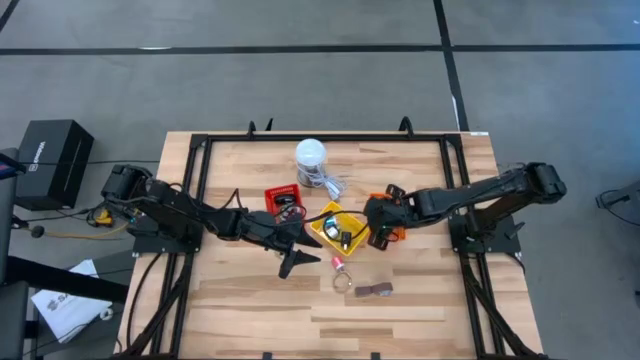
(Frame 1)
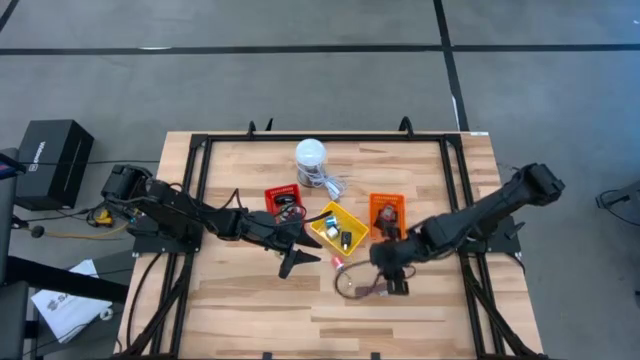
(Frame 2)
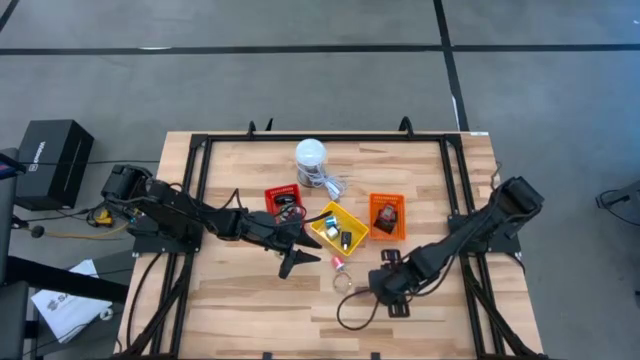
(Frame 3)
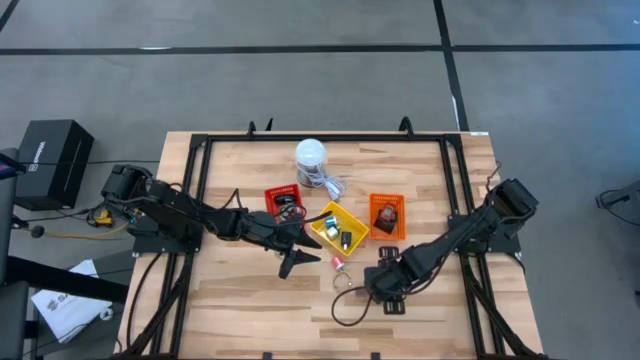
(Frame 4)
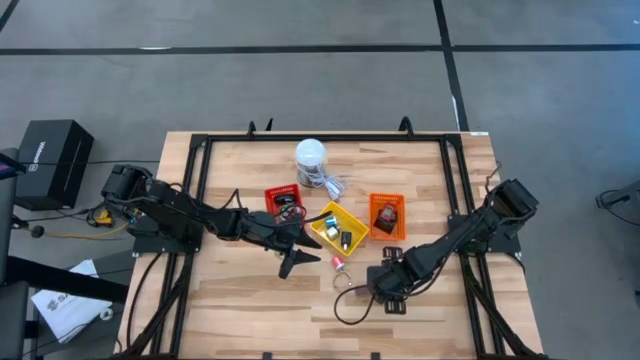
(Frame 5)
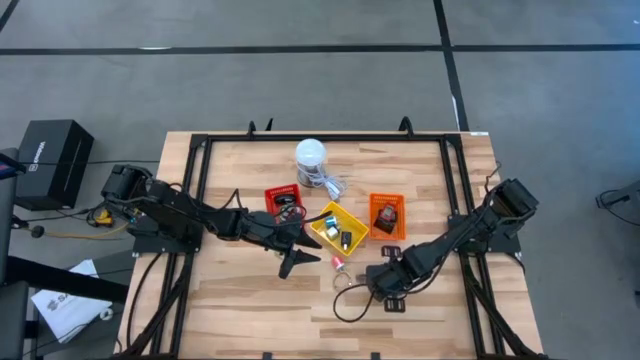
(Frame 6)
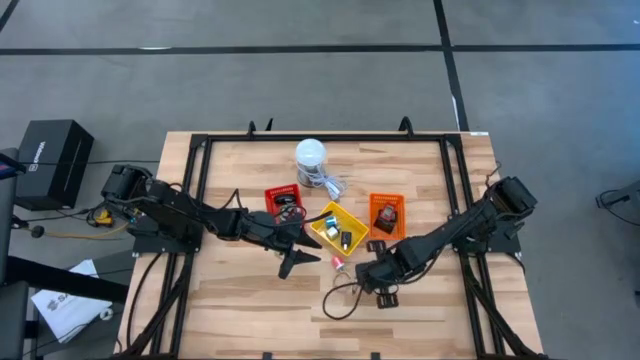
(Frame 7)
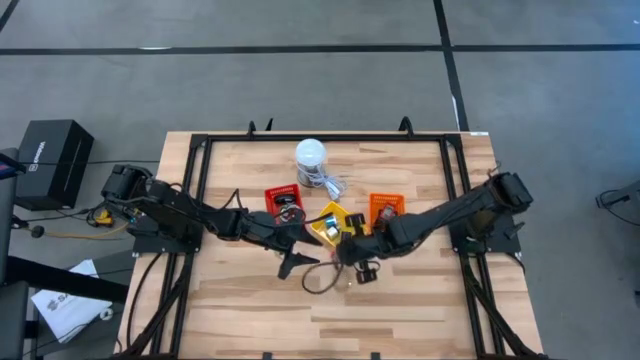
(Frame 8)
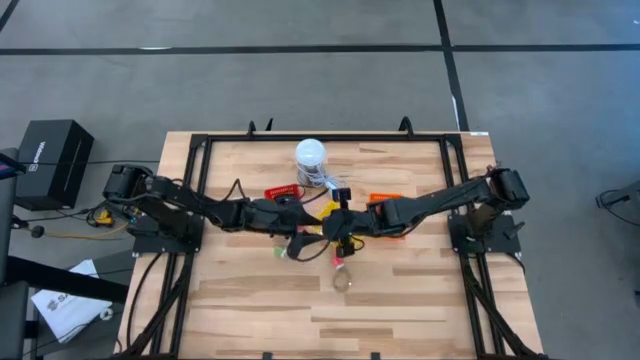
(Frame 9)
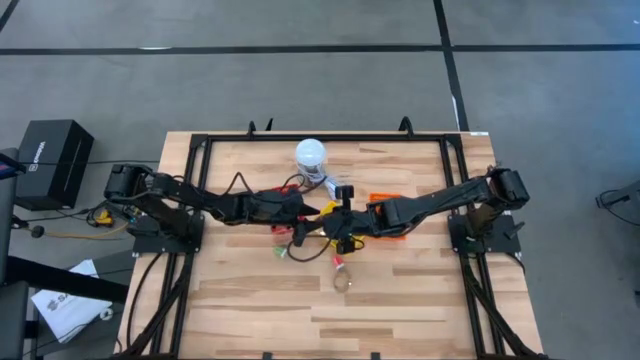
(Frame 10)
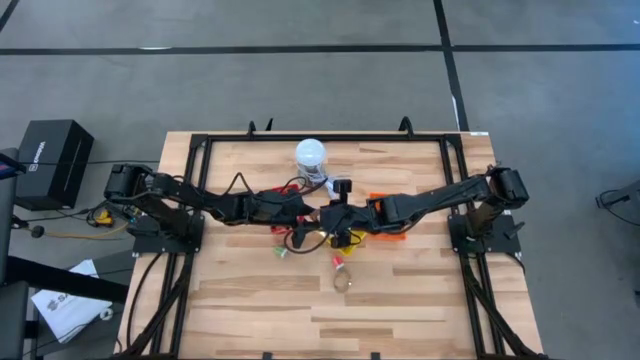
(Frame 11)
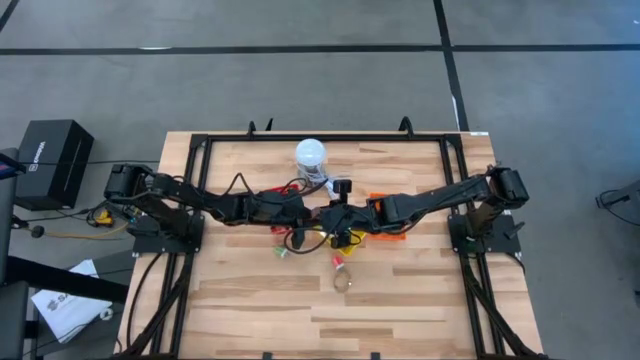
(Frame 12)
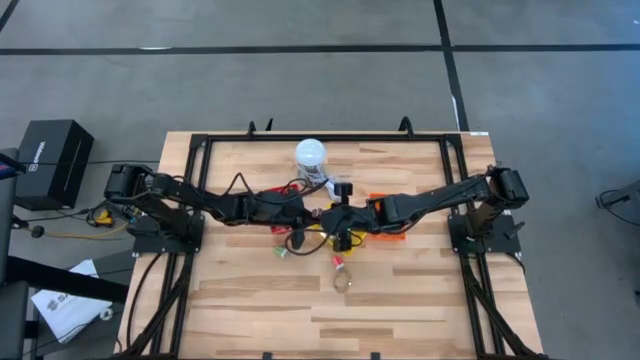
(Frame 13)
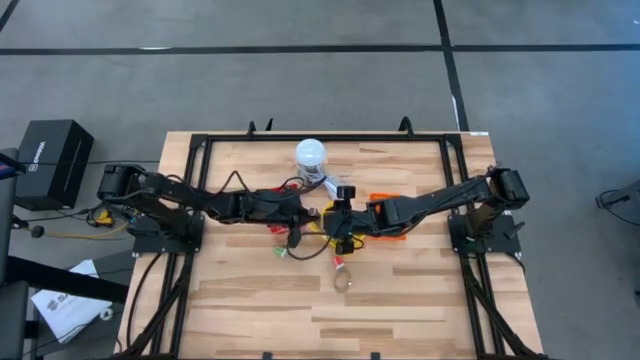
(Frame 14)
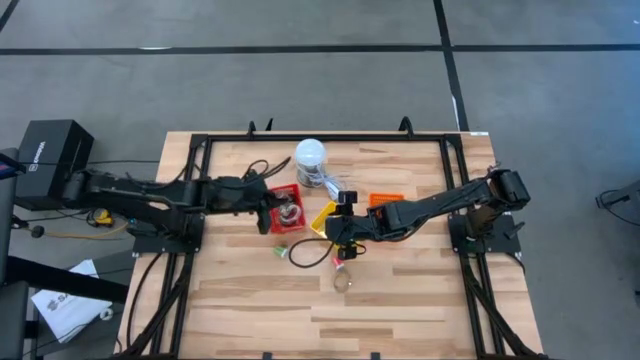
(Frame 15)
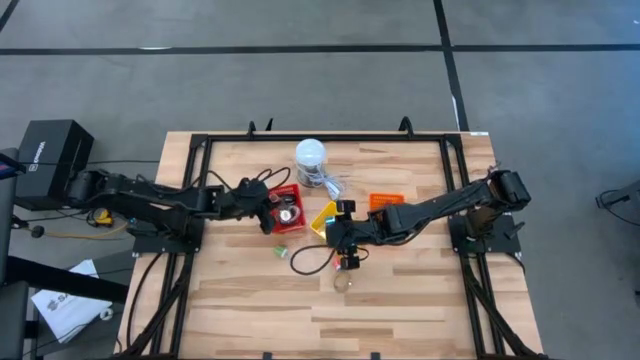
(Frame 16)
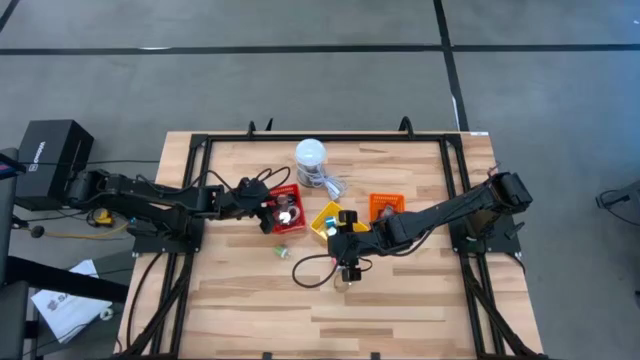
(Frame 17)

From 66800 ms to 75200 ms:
Task: Pick & Place Office items
Put the brown watch into the red basket

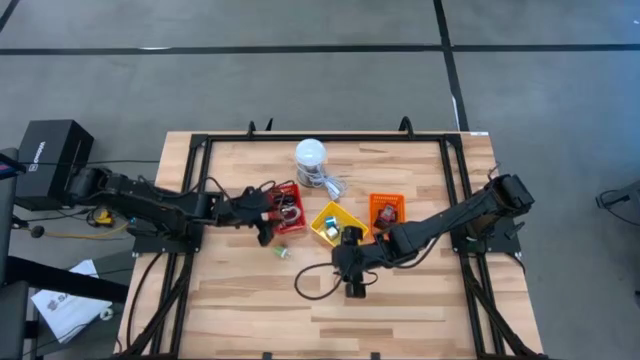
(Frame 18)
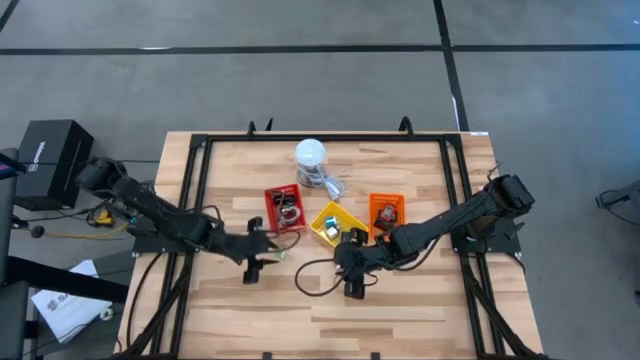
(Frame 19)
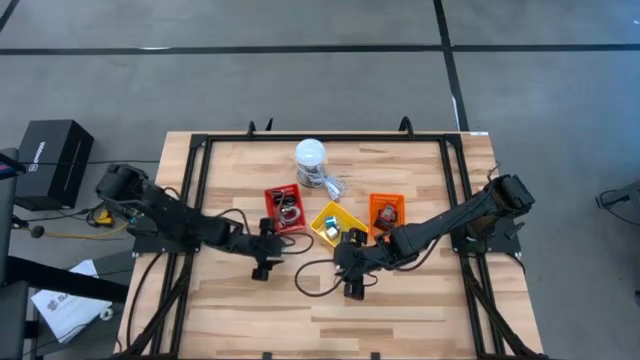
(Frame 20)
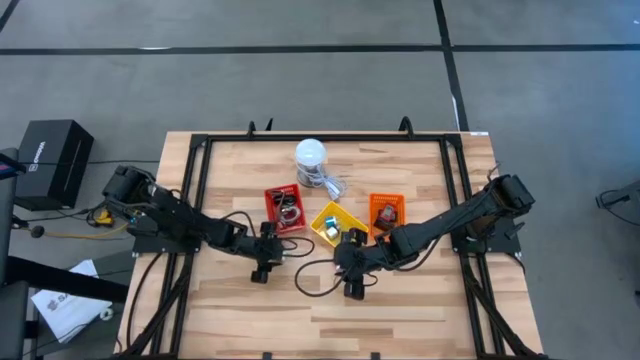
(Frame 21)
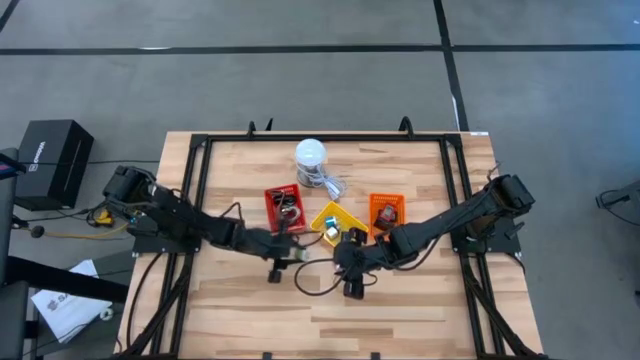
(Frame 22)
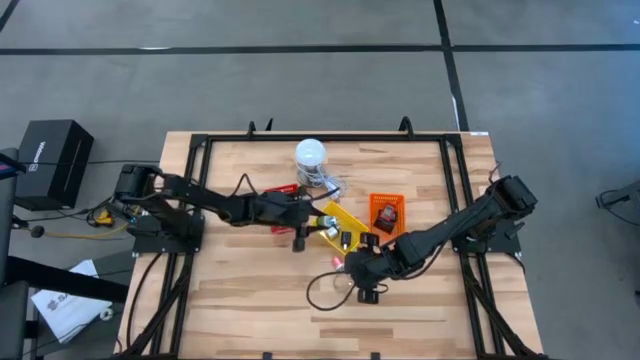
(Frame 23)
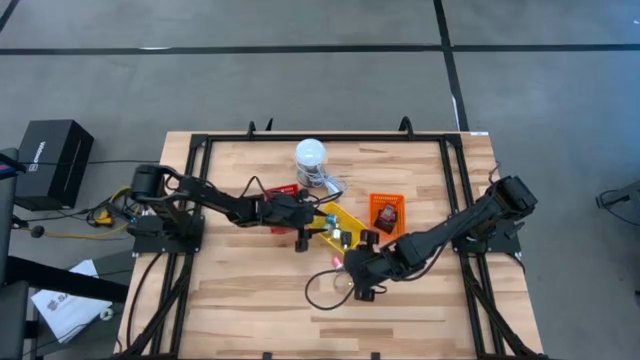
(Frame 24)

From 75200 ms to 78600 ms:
Put the green charger adapter into the yellow basket

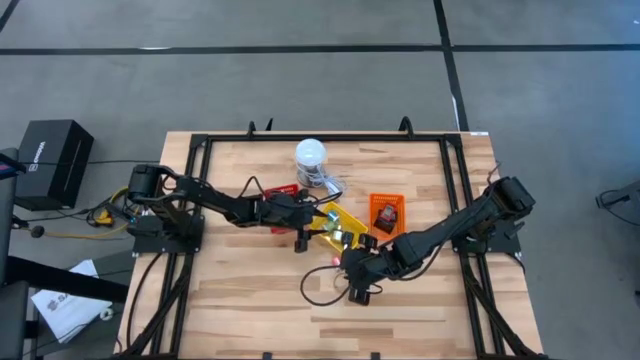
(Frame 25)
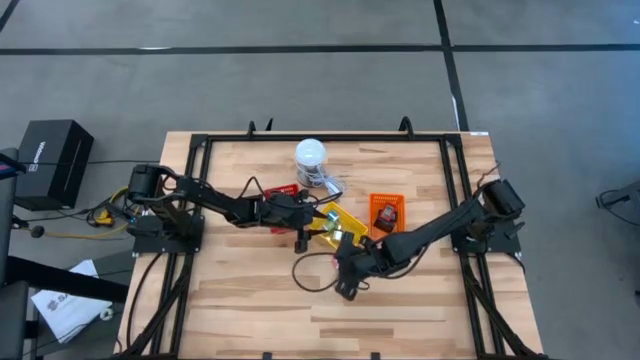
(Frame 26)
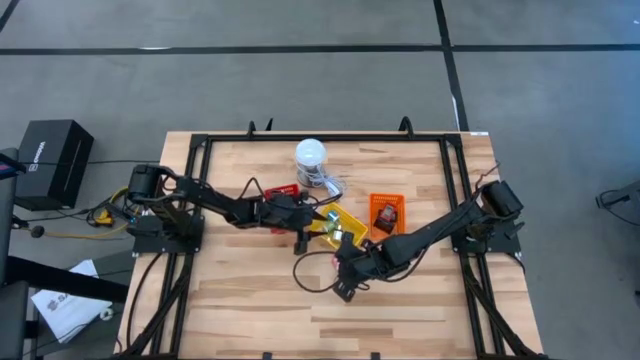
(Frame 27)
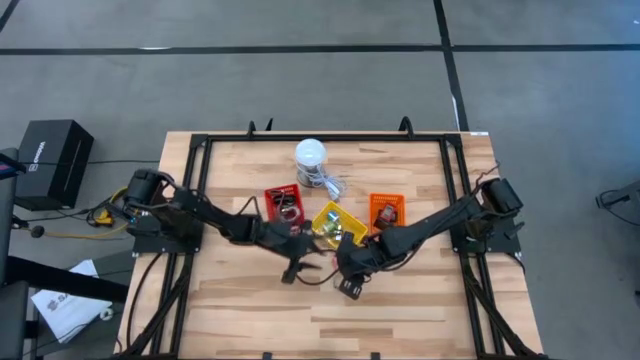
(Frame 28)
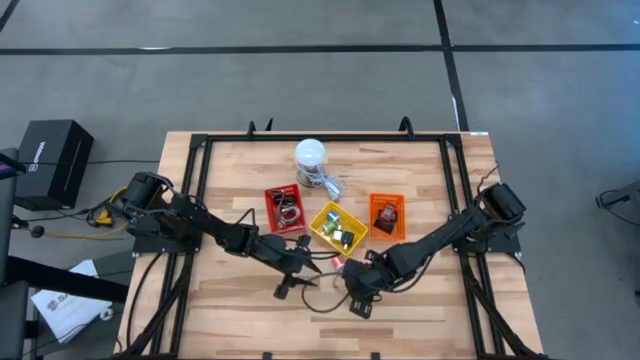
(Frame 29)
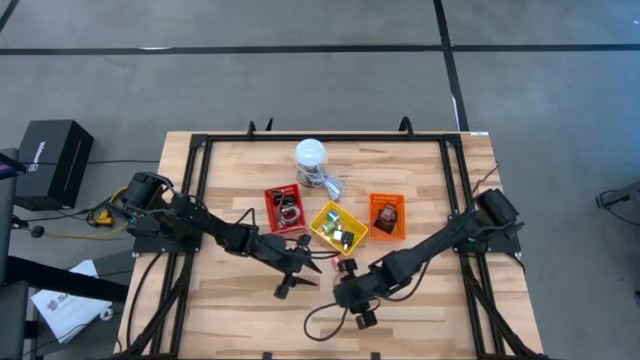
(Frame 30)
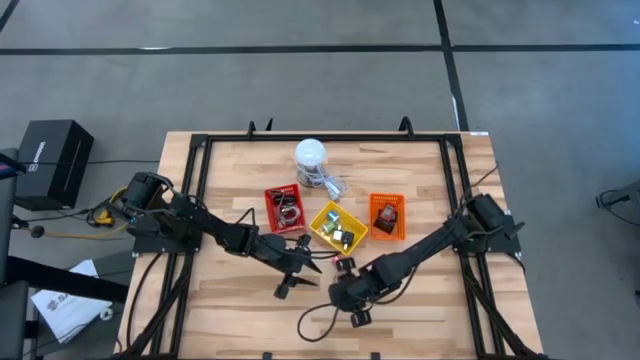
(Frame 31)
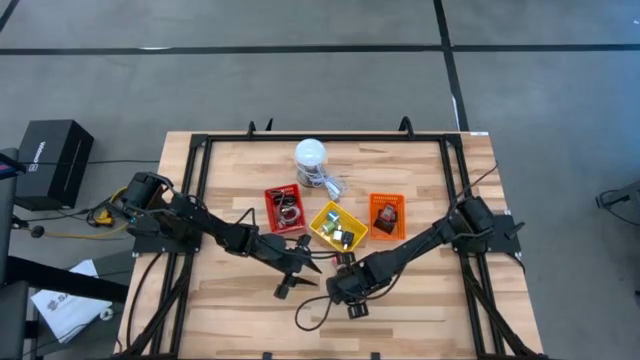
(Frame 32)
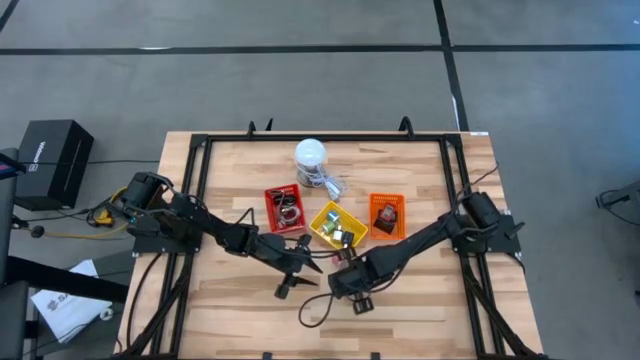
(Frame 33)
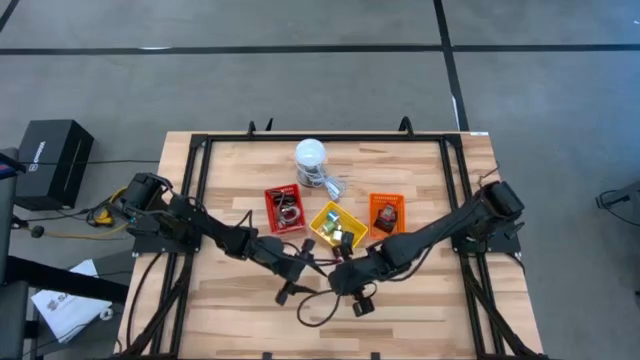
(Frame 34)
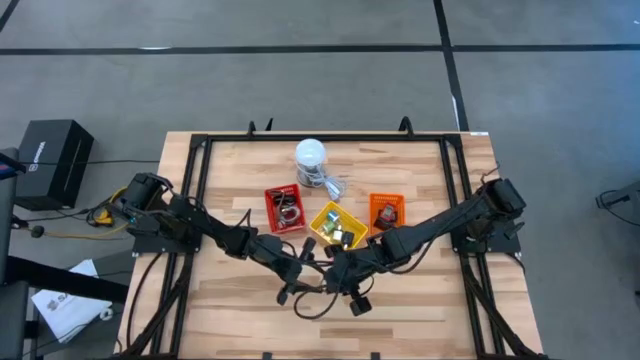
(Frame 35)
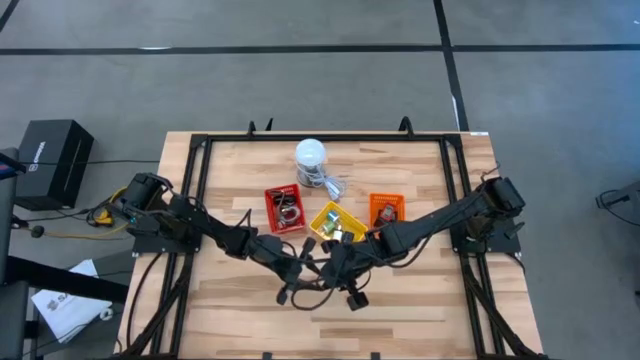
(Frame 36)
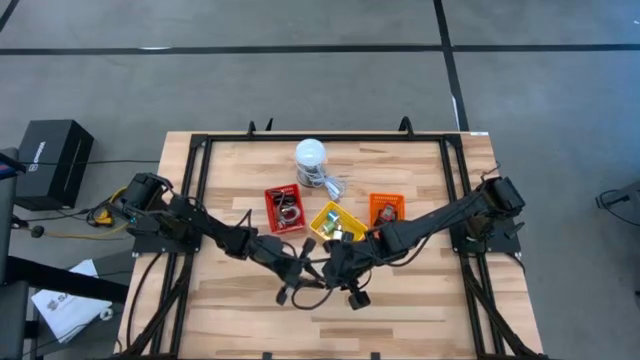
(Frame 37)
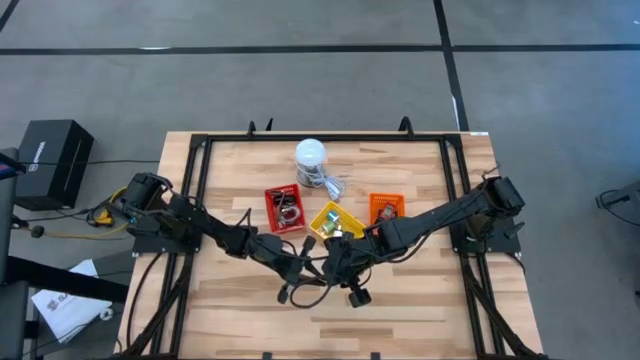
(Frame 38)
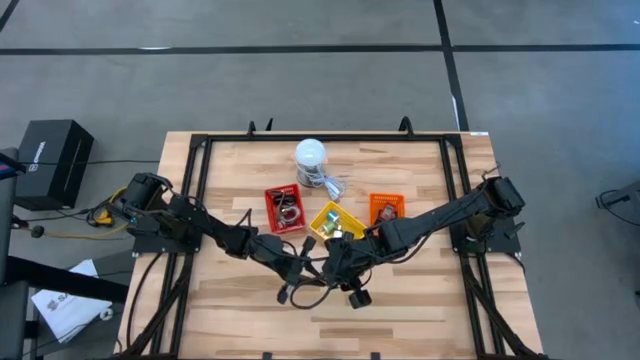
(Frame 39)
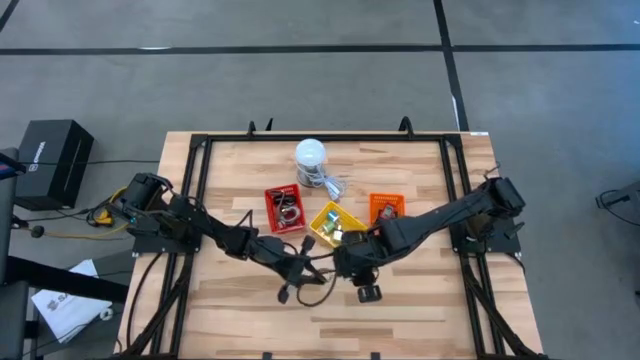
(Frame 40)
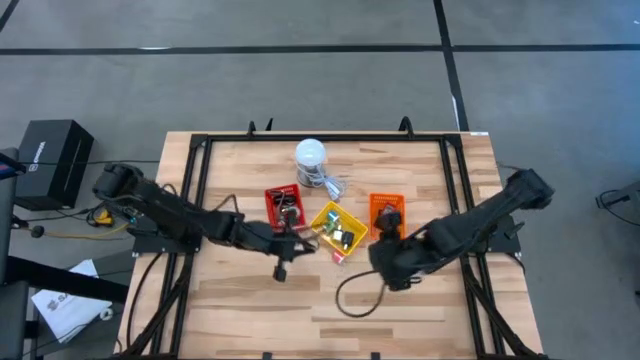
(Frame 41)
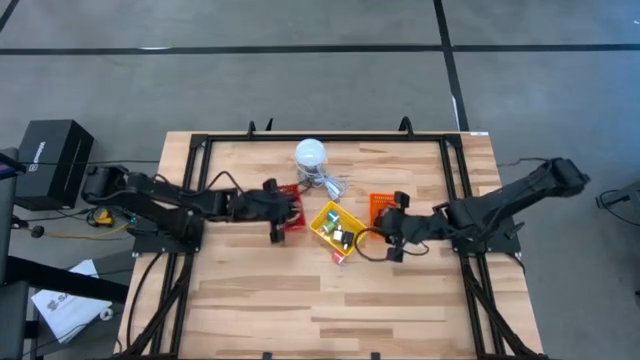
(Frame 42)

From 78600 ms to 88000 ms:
Put the gold watch into the red basket

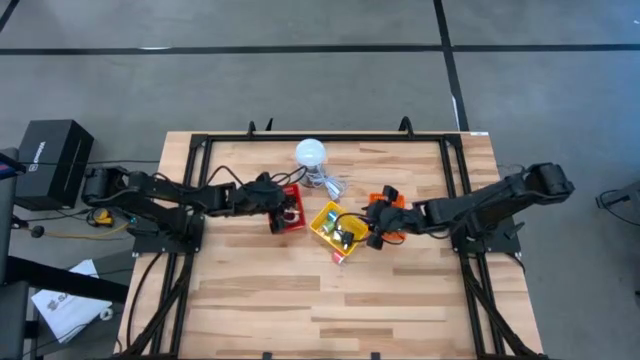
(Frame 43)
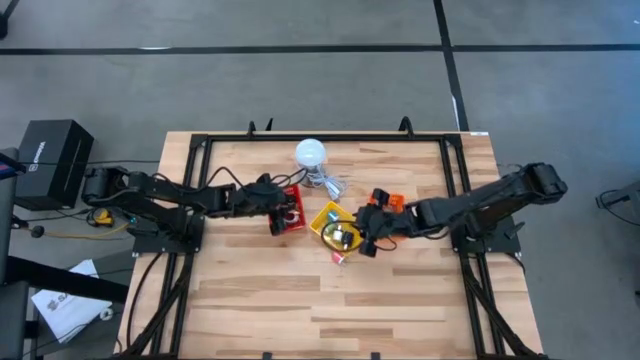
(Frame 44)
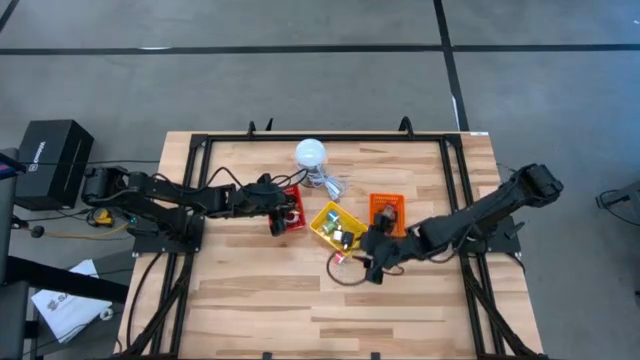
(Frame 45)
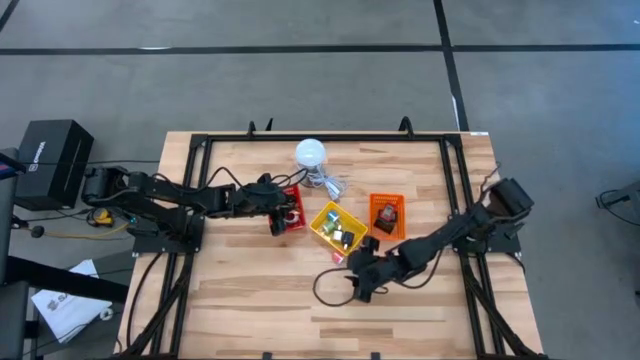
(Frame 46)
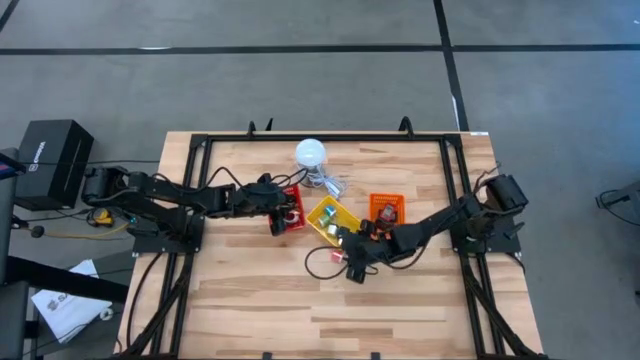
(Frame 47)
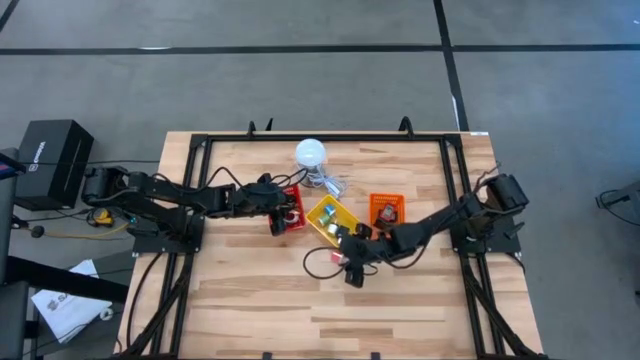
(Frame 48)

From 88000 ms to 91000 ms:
Adjust the yellow basket
